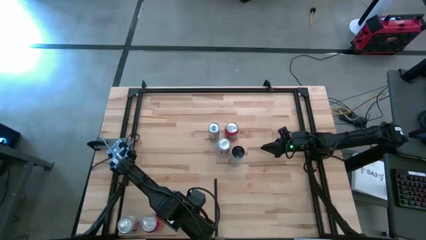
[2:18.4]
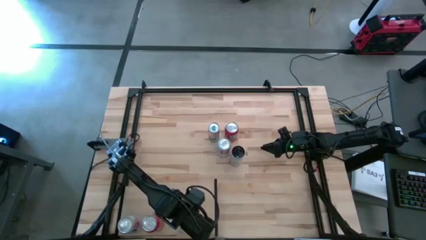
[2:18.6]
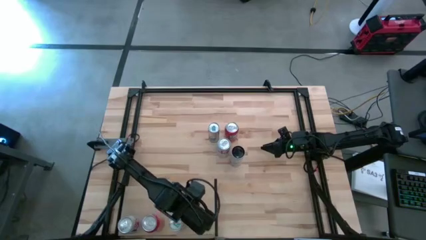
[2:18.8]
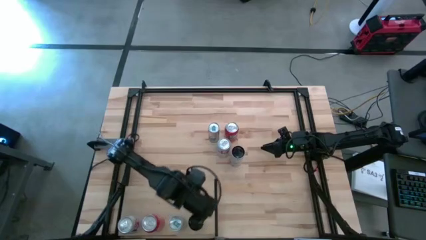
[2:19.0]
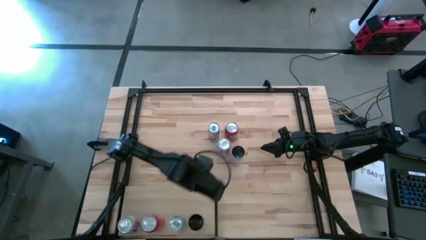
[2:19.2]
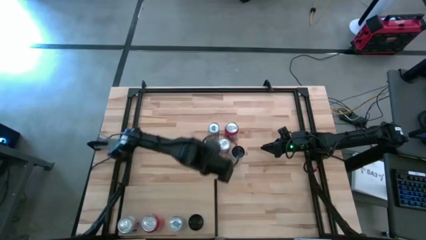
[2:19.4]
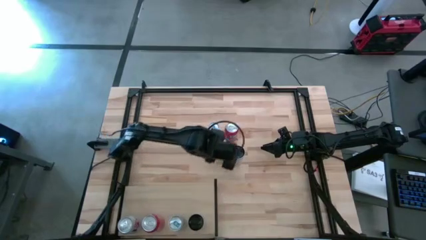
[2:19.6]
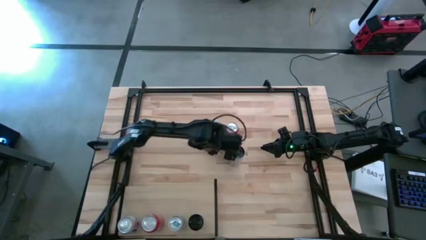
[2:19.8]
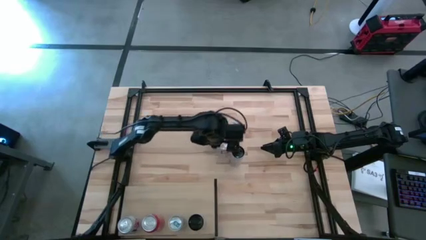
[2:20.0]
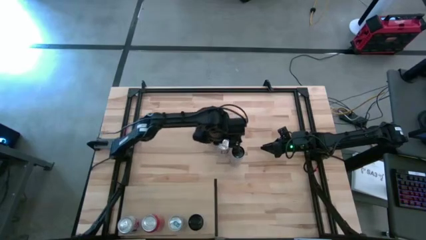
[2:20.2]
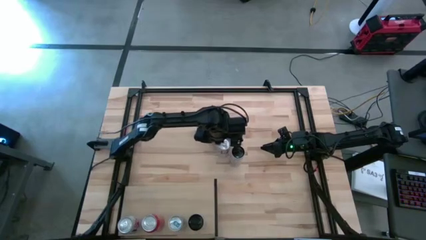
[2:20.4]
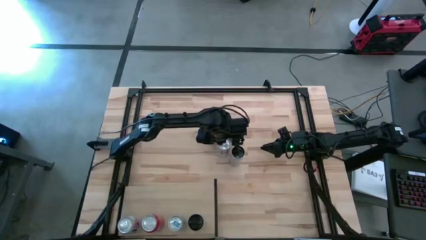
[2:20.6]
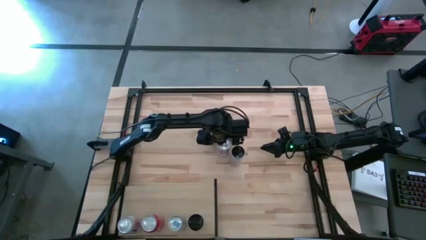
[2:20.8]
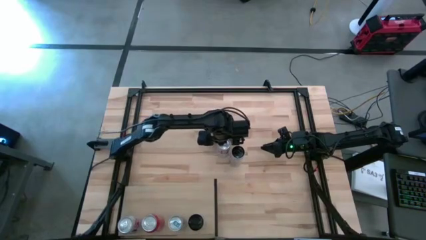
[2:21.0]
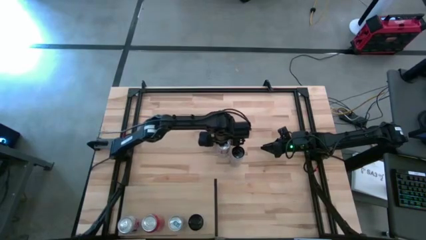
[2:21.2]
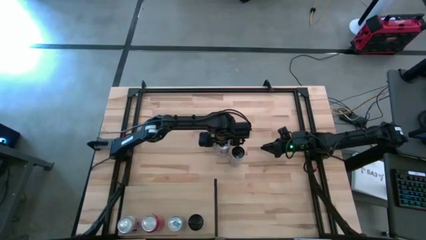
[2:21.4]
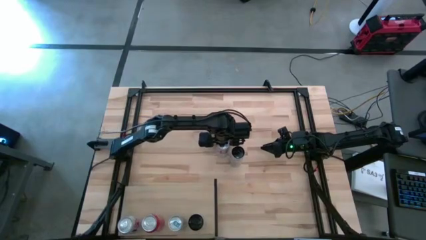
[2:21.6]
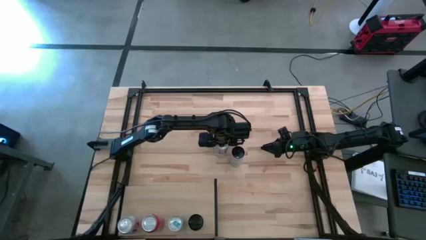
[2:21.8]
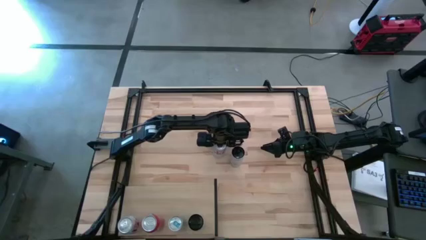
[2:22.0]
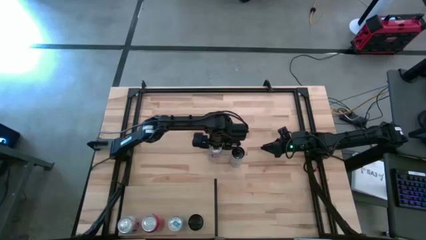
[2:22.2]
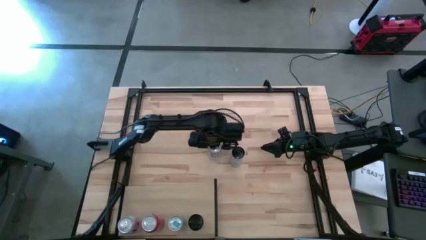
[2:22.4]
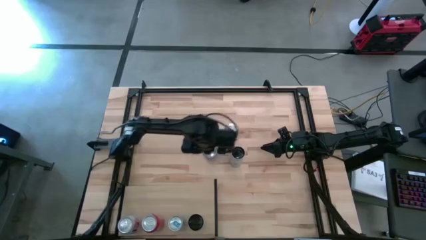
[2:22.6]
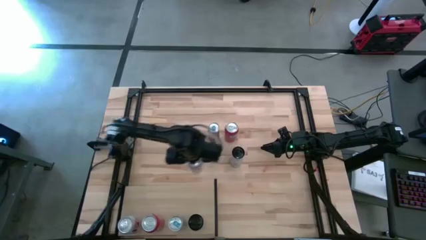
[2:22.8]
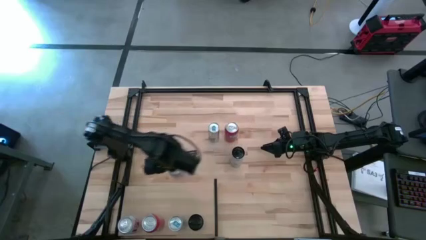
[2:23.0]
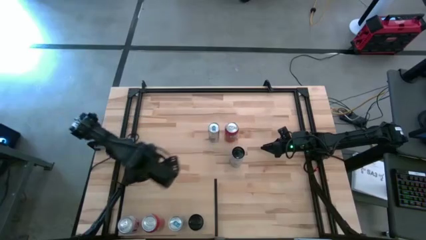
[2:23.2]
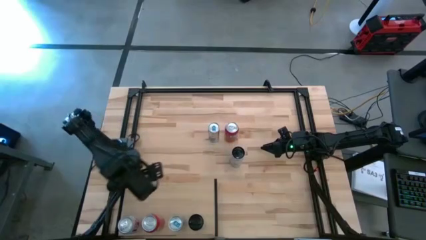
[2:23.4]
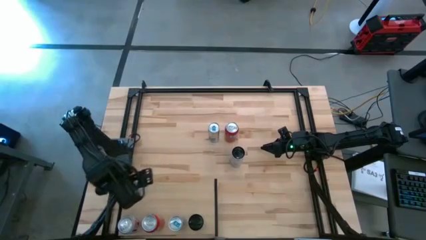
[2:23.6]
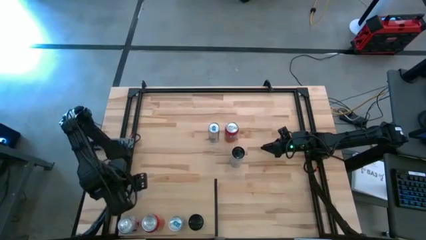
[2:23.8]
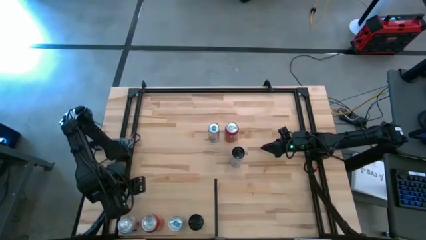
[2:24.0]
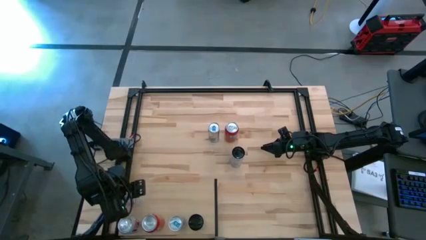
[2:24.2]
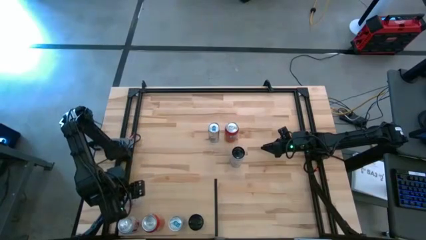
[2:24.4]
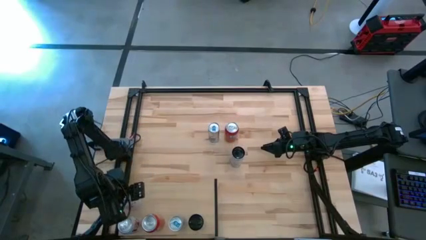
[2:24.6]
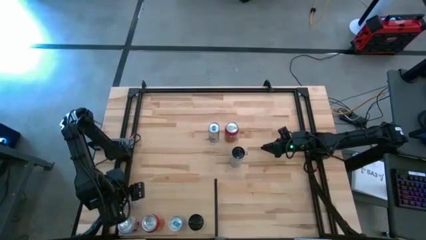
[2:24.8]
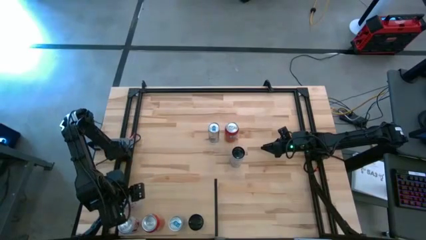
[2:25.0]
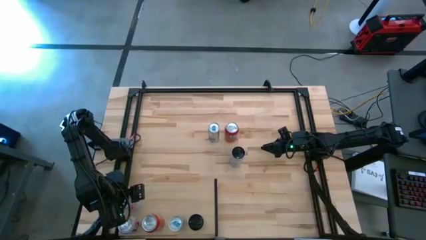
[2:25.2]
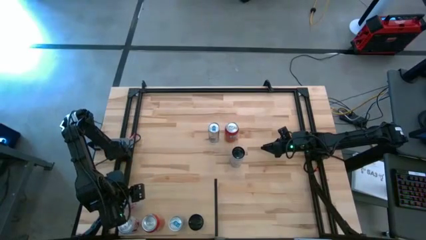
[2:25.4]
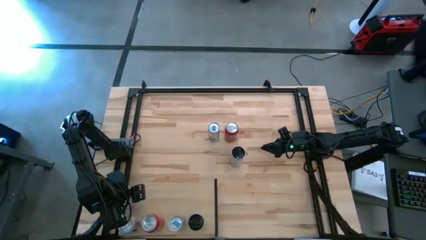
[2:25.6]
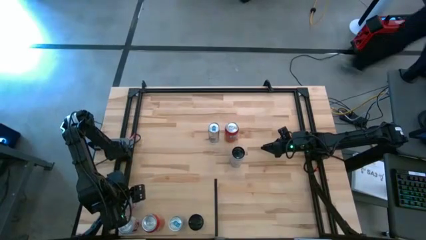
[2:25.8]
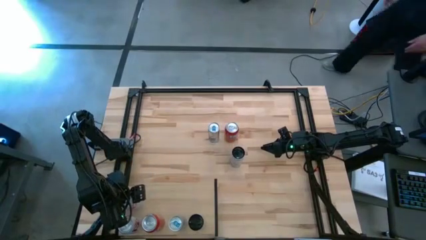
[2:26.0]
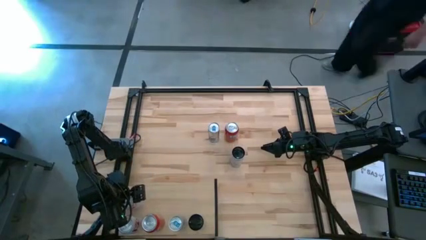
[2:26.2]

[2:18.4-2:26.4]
Task: Place canned beverage on shelf
Put the red silver soda can on the shelf aligned with the other red silver soda can

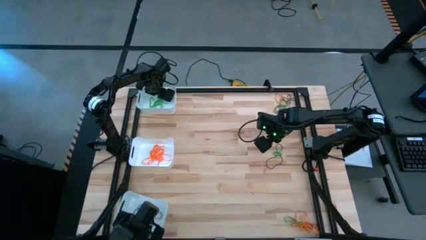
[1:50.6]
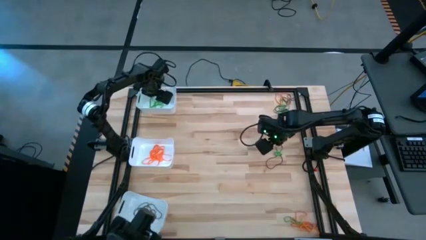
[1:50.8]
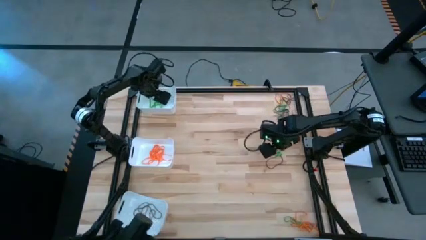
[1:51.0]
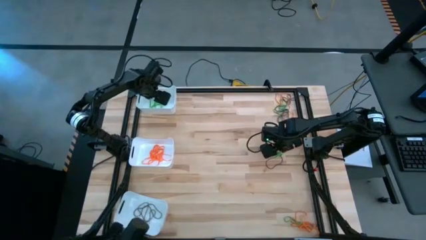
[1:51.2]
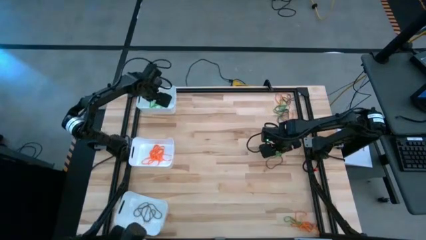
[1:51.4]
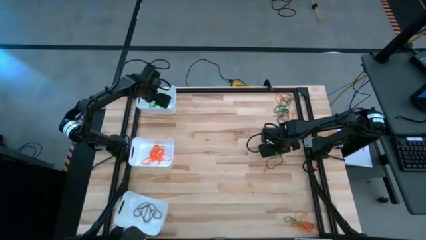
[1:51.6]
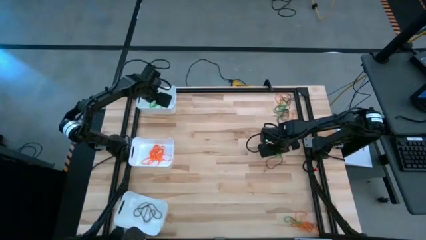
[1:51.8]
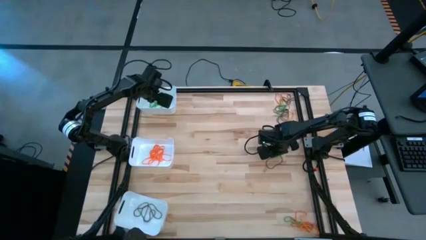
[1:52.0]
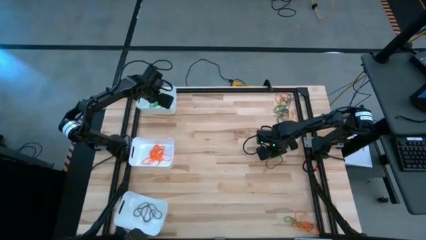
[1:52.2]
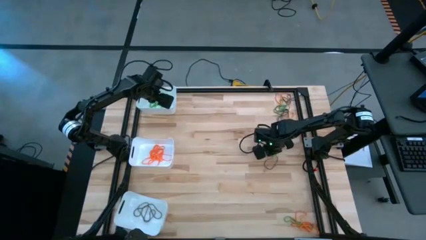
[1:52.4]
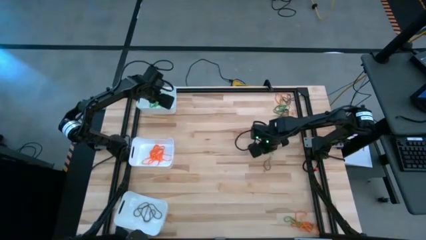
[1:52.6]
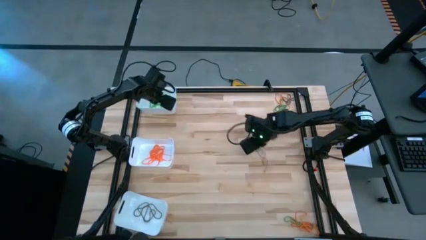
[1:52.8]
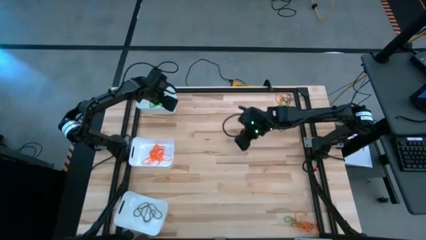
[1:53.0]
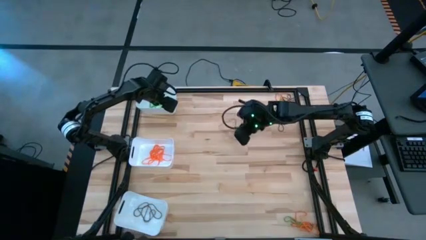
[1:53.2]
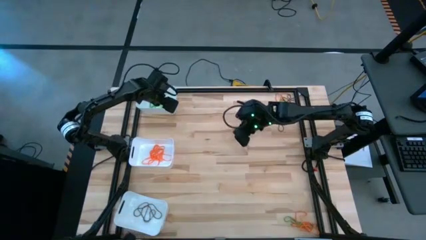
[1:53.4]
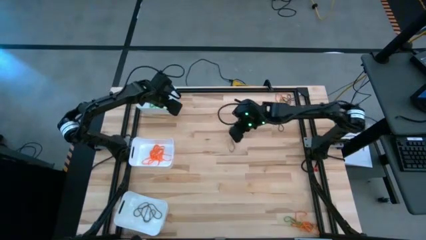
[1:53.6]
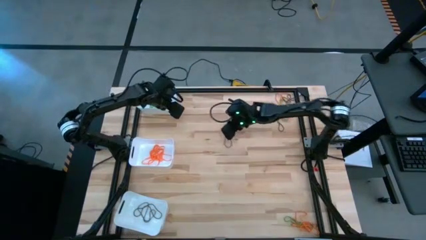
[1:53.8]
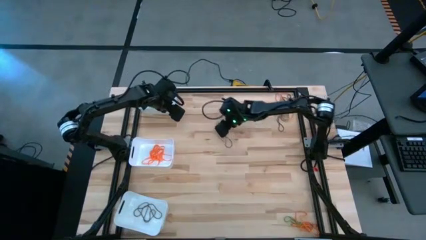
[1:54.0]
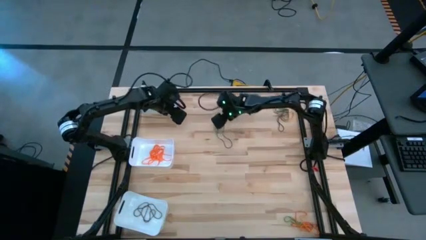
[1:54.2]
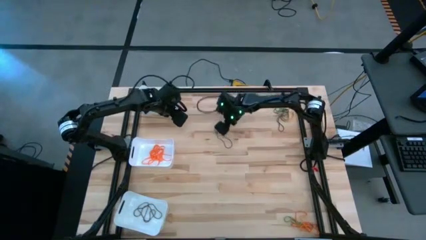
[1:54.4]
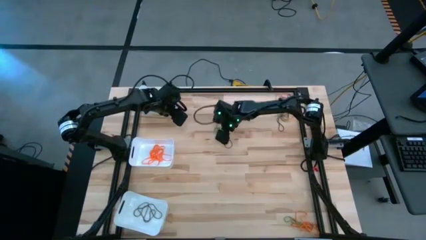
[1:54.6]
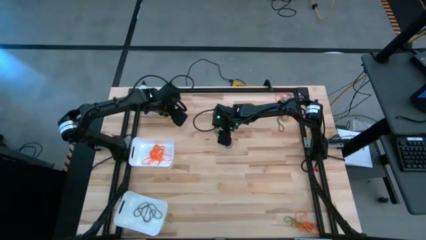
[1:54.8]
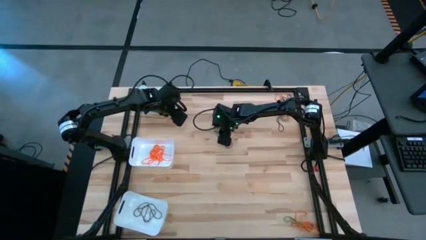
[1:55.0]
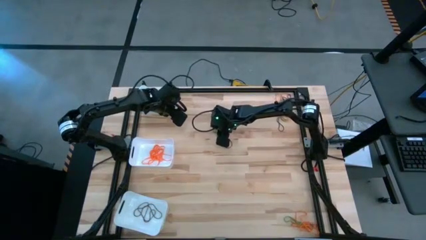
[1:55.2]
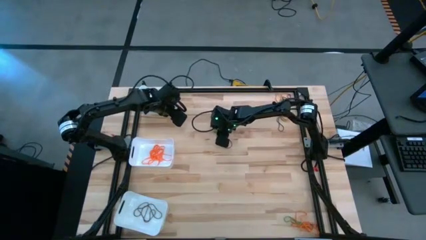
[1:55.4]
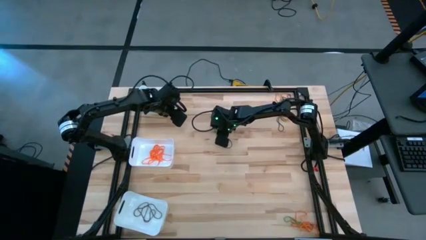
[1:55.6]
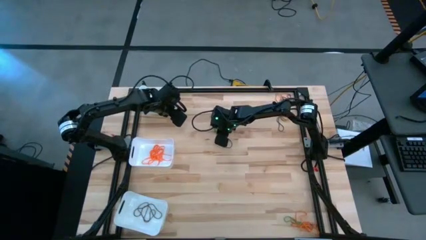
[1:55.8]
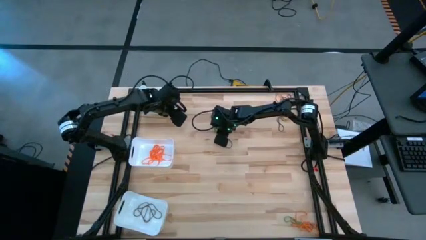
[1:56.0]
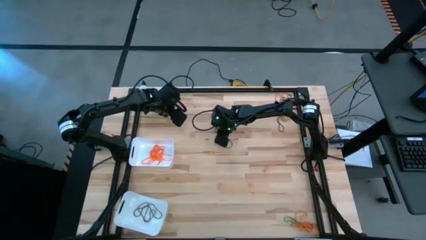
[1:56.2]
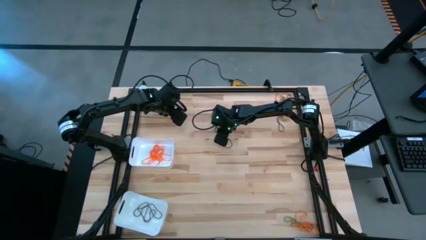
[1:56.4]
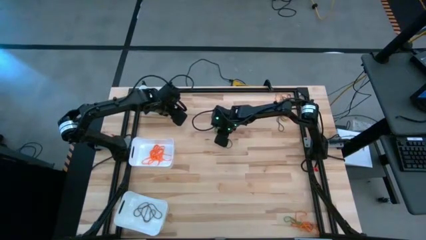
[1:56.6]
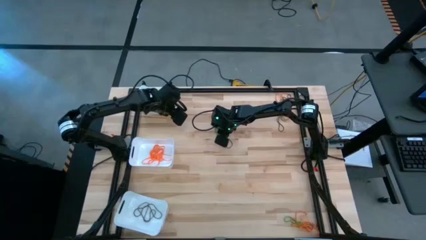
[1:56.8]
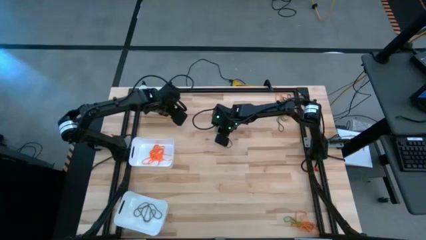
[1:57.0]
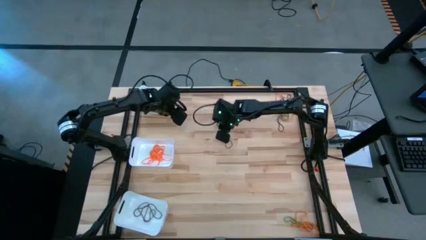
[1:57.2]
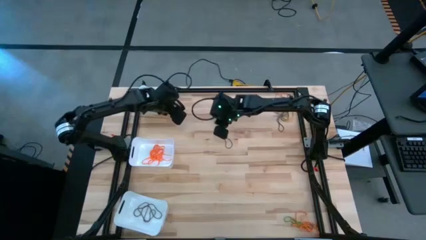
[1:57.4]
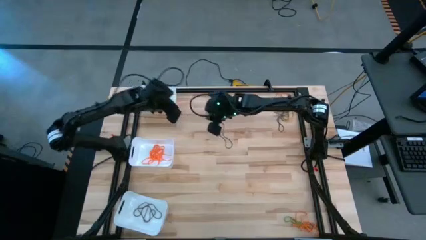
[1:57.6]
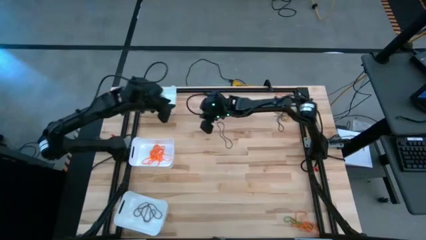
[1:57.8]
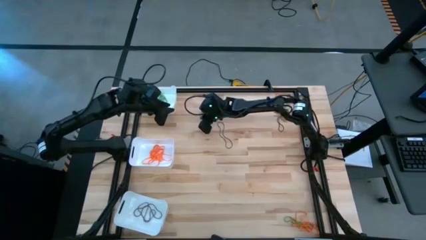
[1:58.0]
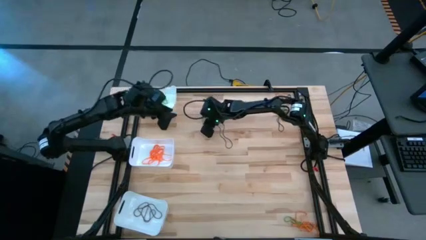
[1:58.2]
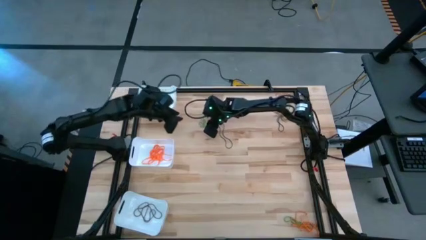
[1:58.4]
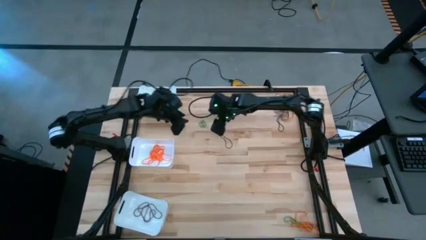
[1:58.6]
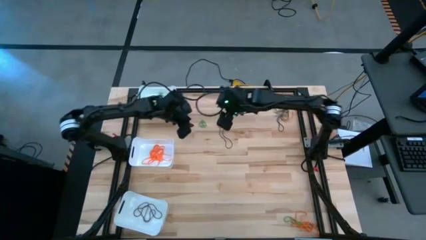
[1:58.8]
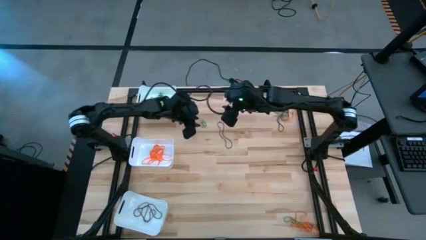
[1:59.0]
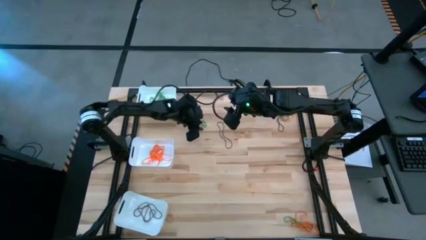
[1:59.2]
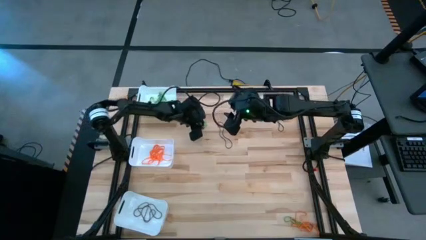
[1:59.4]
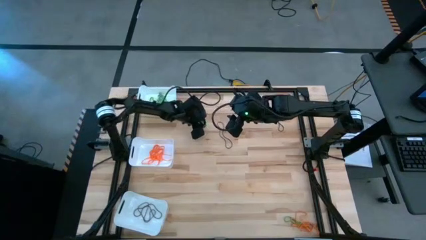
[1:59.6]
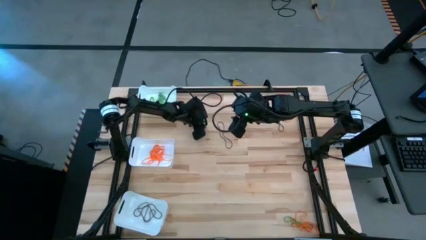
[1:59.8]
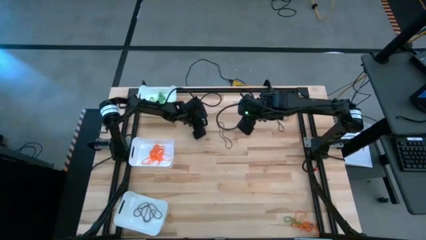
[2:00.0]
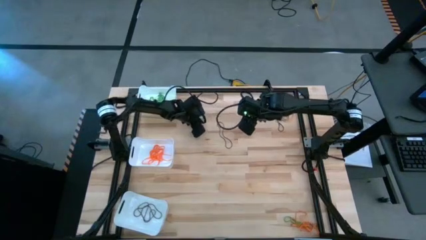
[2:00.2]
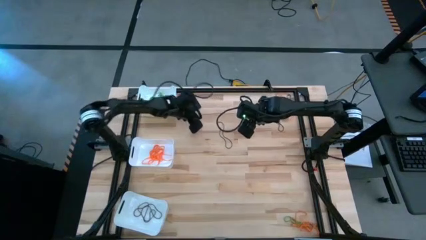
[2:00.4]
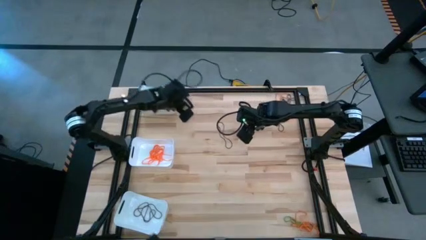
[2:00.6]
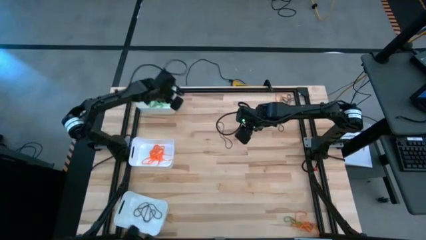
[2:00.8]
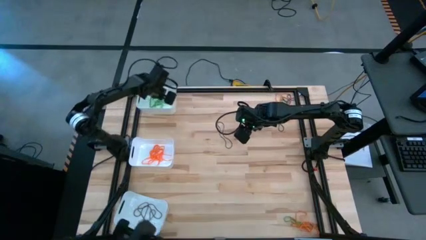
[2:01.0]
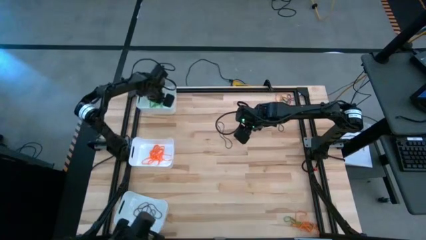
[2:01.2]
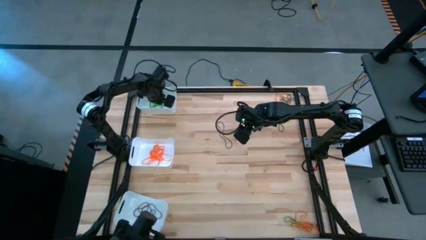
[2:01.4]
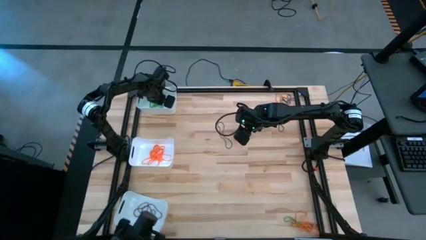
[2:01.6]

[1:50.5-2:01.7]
Task: Sort rubber bands into baskets
Put the green rubber band into the top white bin
